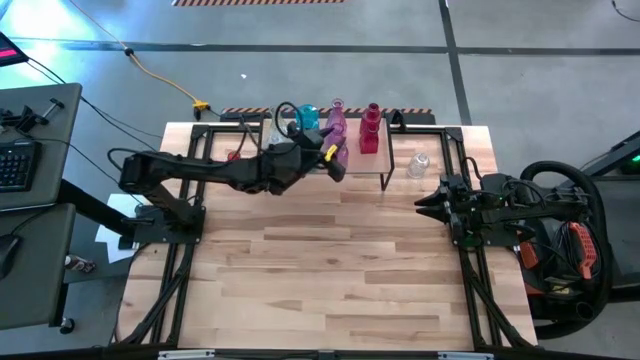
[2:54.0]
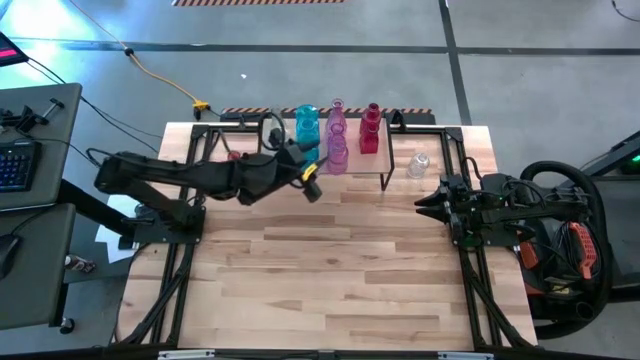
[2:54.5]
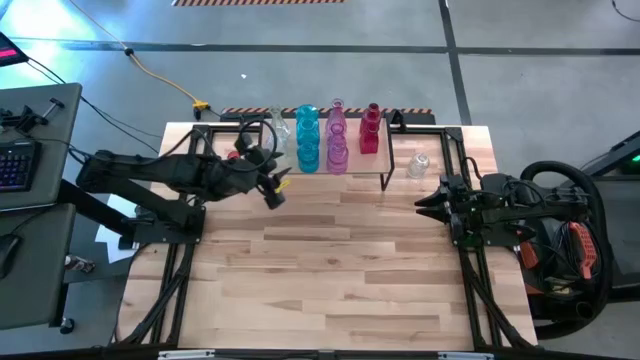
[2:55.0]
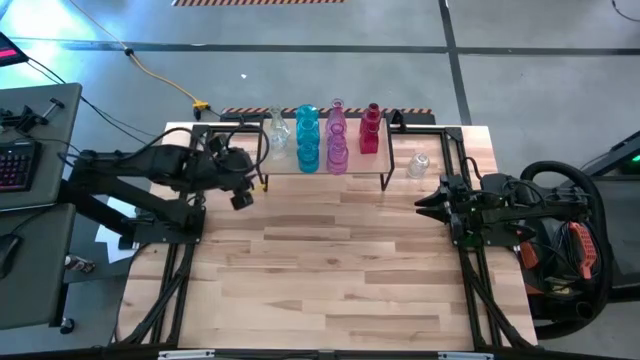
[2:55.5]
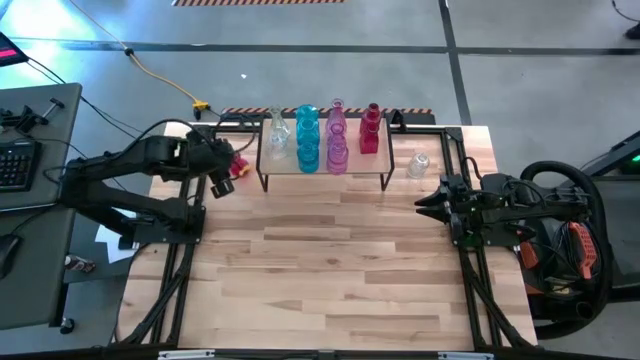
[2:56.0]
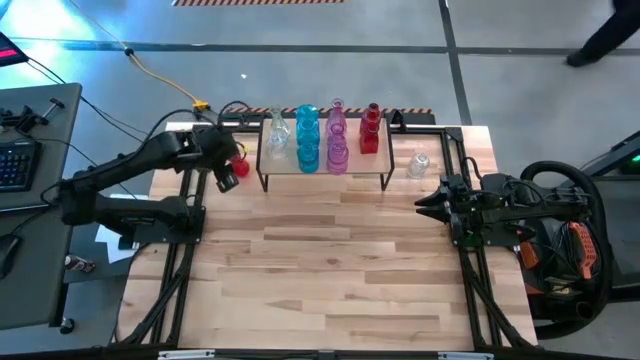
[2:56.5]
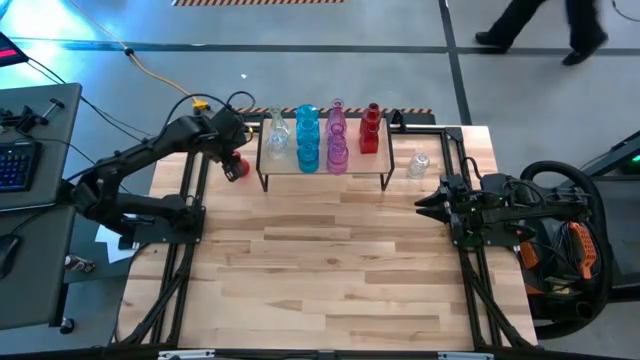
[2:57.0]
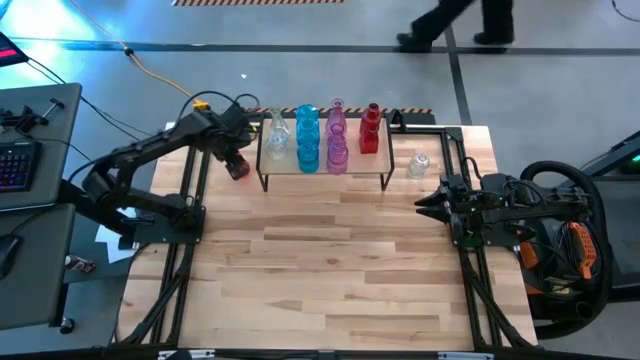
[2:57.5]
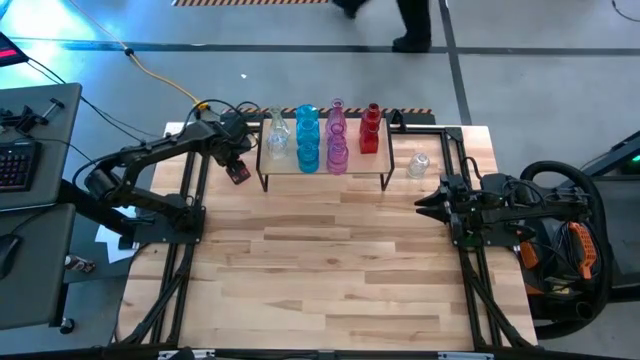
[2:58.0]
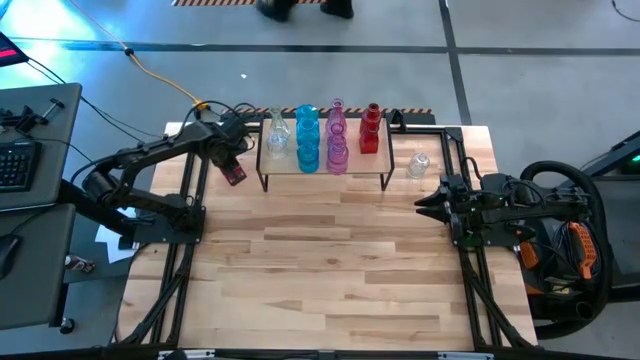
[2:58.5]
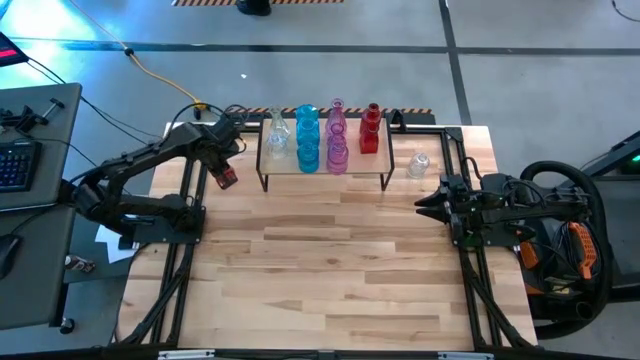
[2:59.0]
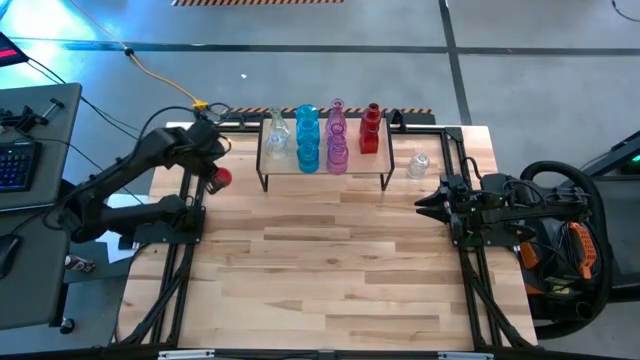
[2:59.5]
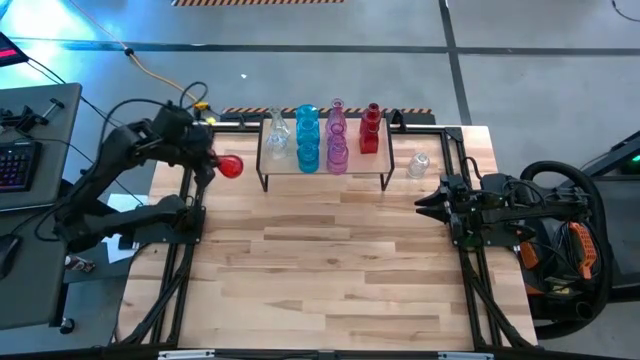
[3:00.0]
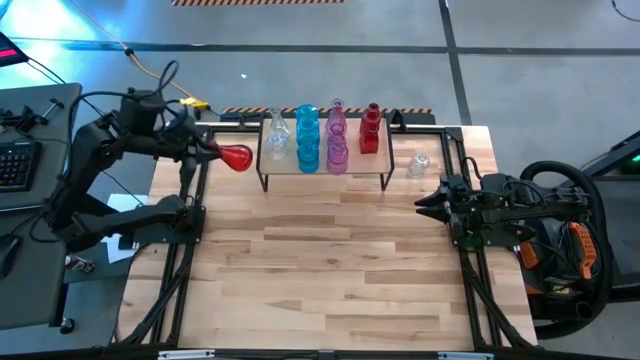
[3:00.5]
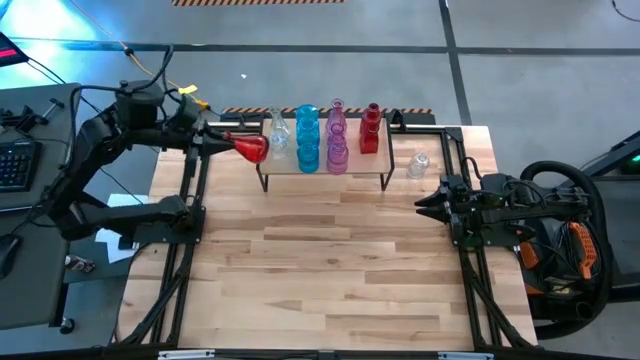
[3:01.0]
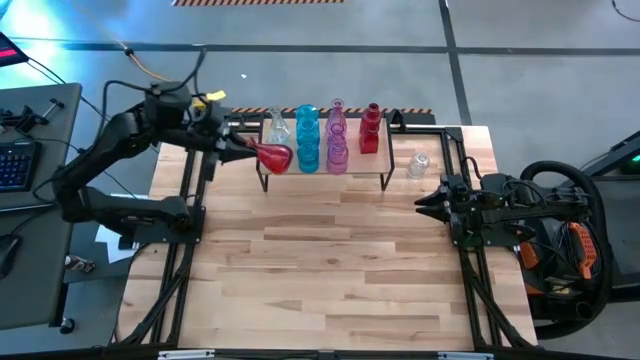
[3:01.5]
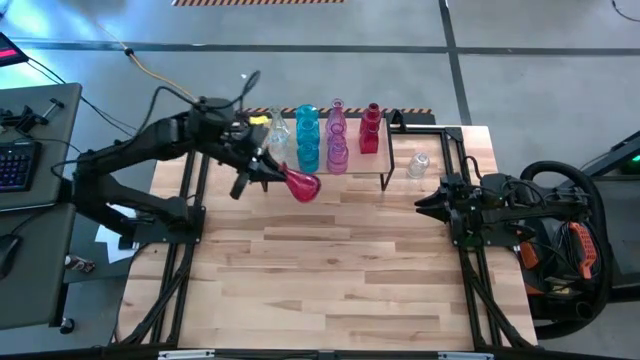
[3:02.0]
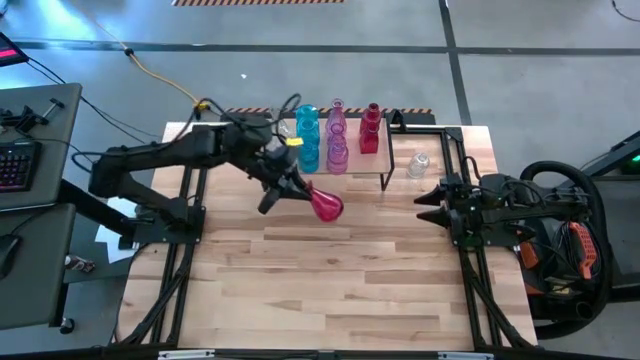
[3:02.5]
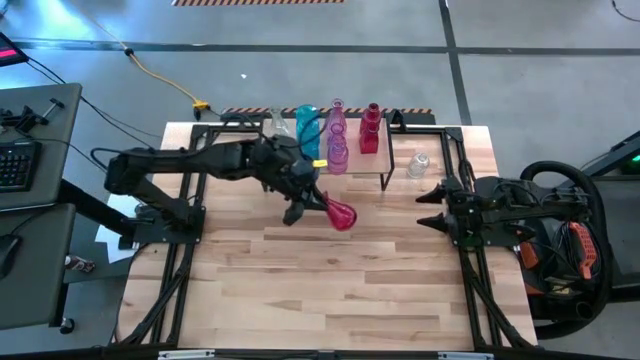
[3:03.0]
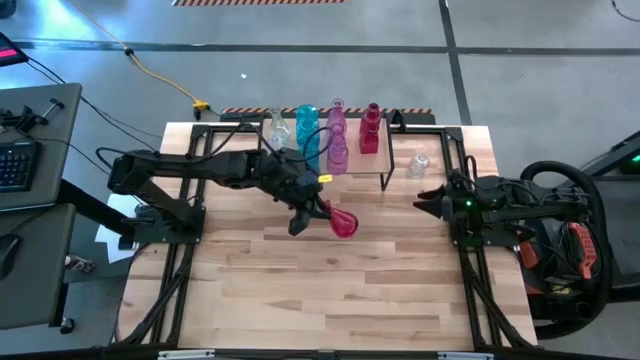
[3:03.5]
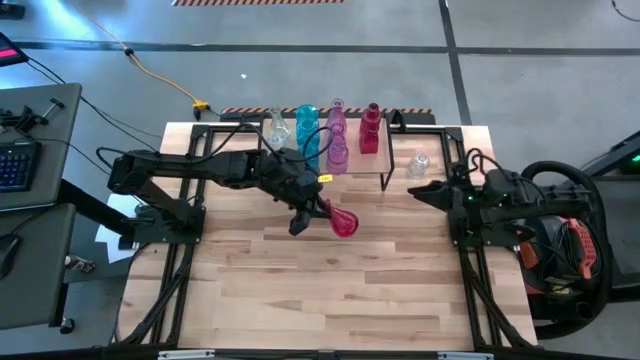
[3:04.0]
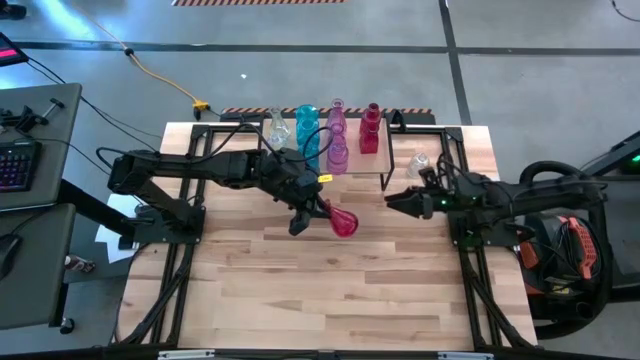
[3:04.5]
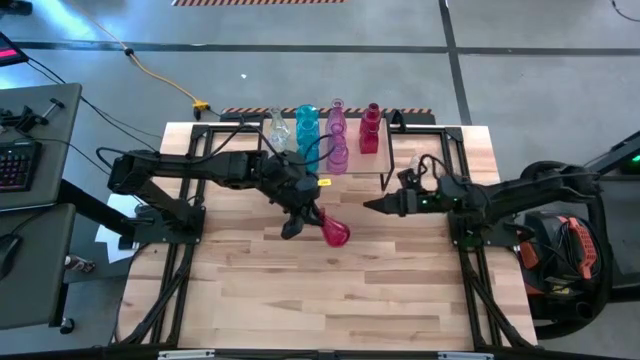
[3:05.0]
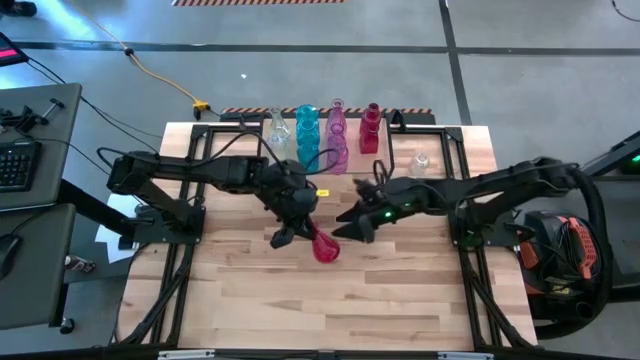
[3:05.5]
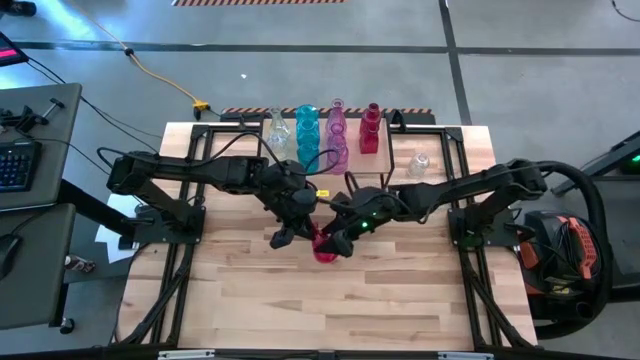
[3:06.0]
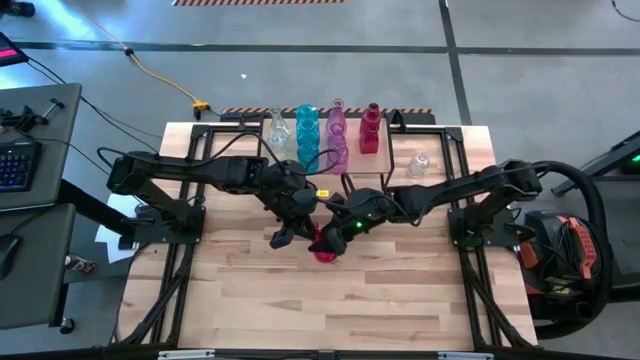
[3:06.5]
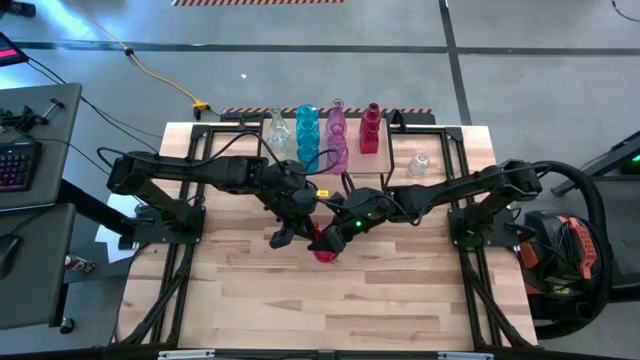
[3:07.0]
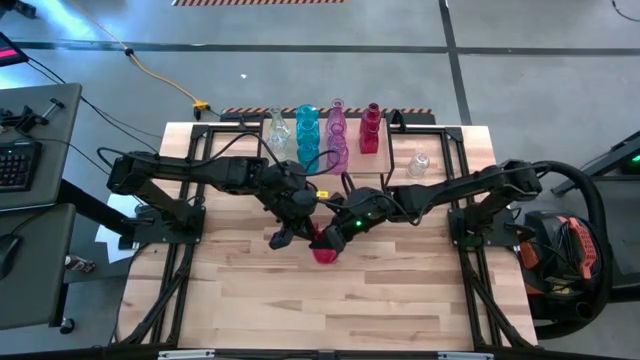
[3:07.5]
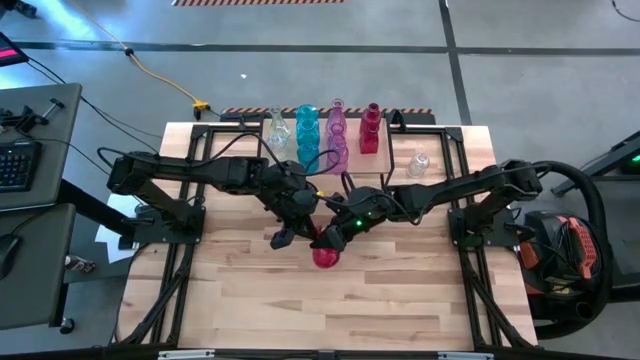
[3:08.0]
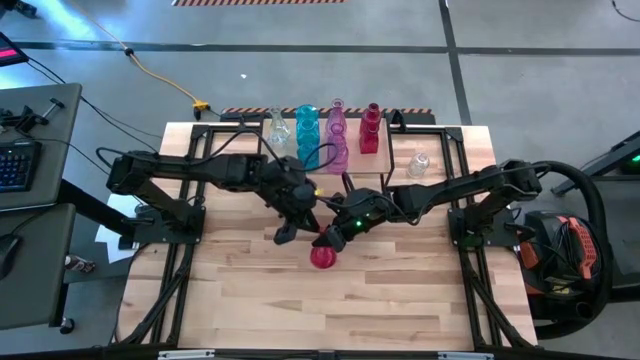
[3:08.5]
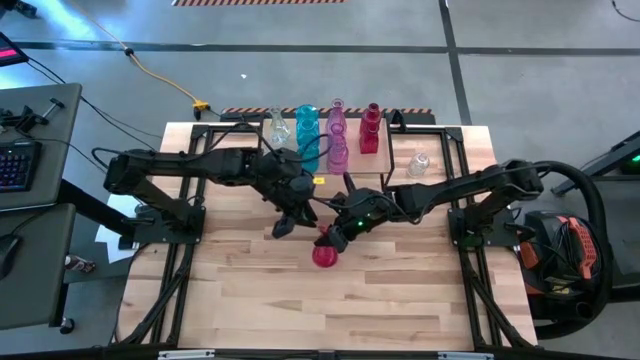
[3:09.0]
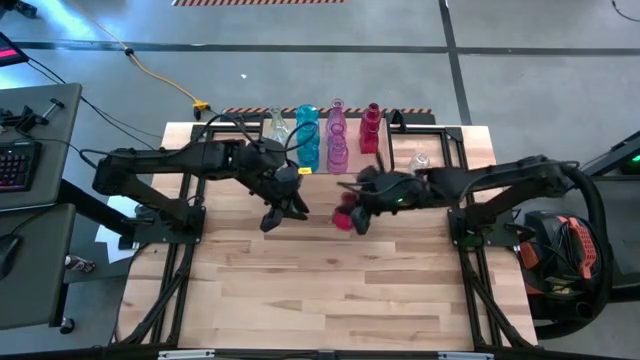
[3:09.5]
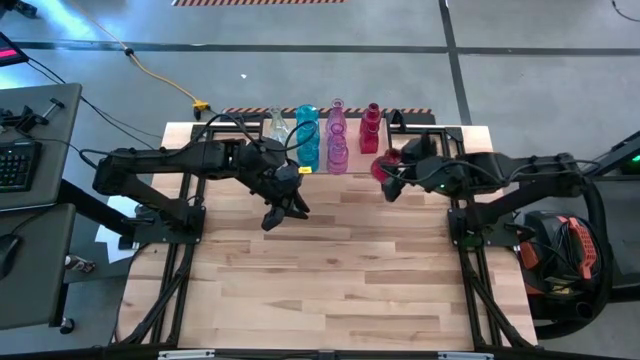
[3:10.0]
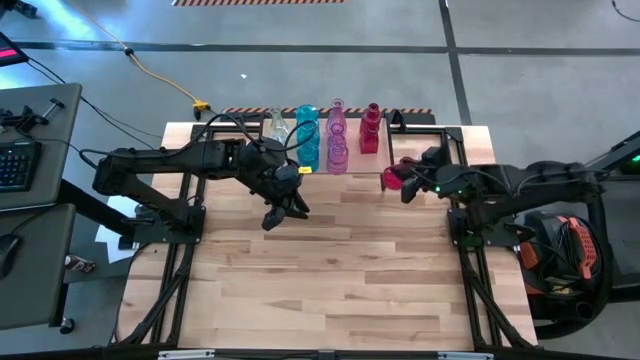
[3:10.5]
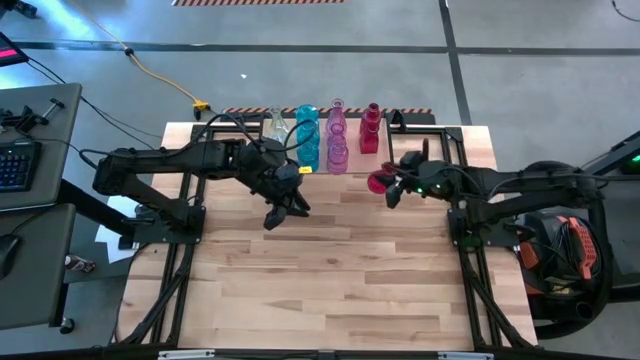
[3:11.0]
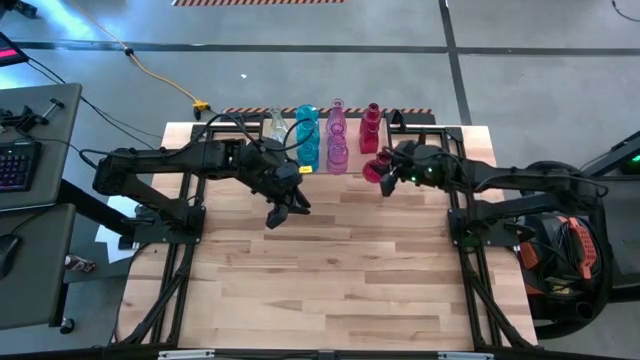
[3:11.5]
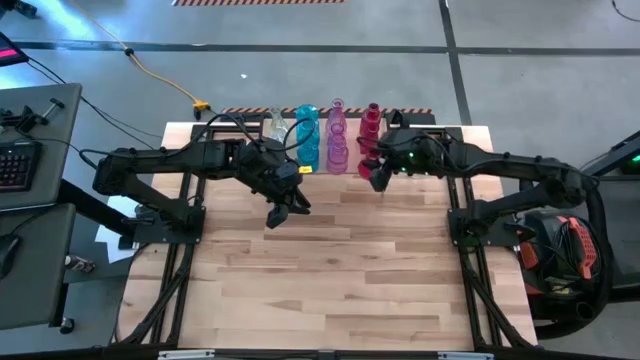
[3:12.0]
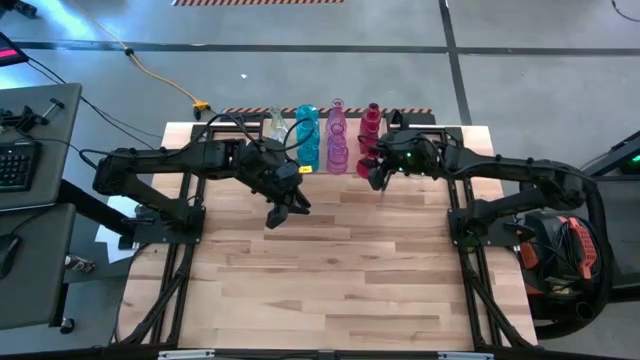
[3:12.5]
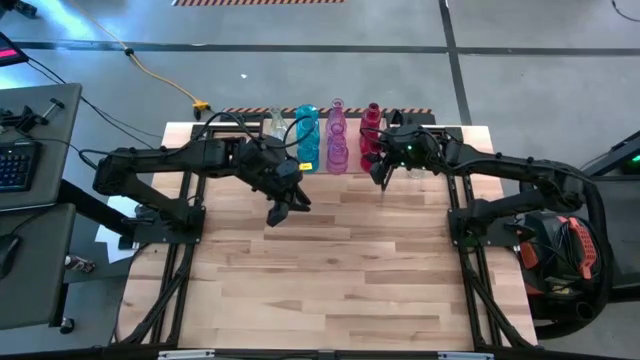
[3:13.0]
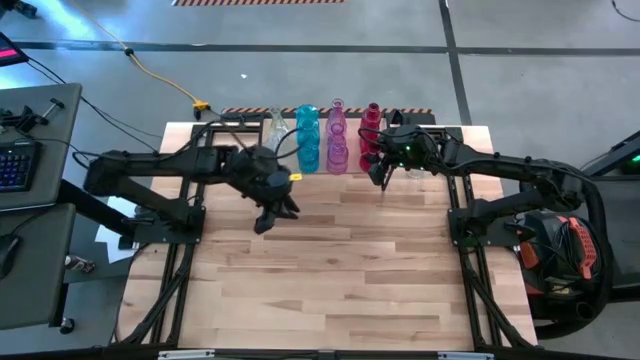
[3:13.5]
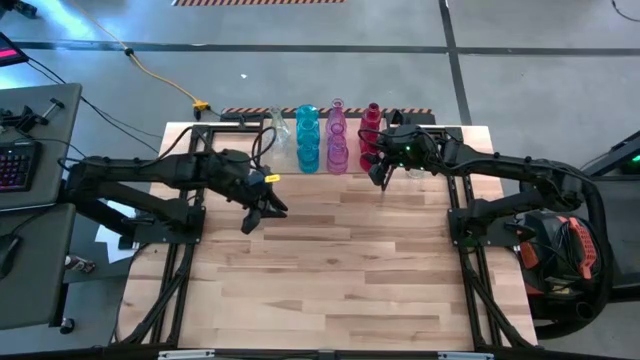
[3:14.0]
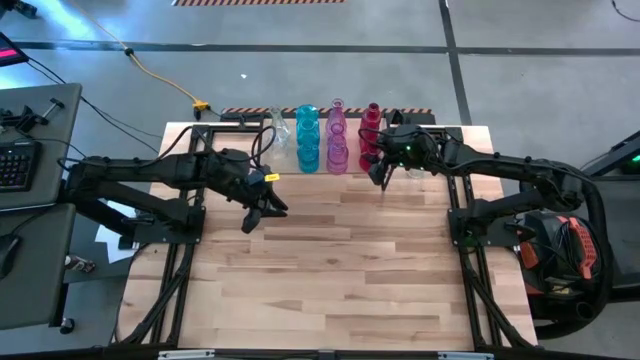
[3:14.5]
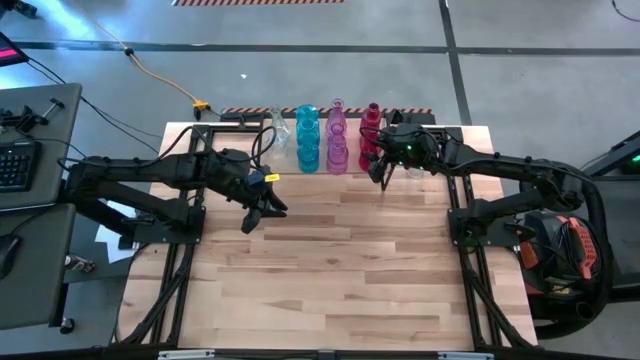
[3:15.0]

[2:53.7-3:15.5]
Task: sort vases onto shelf
Put the red flower vase on the shelf aligned with the other red flower vases
